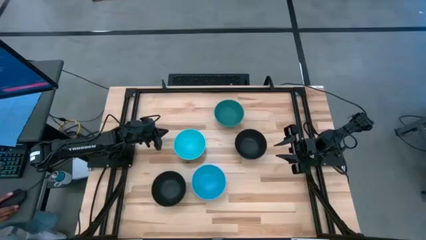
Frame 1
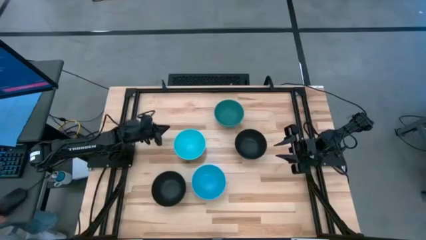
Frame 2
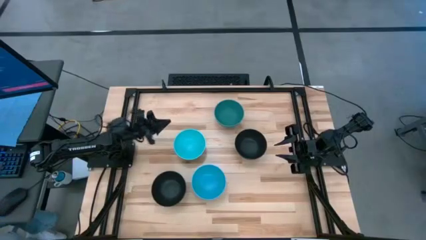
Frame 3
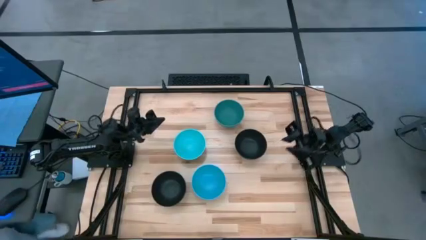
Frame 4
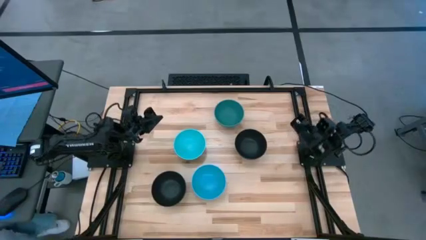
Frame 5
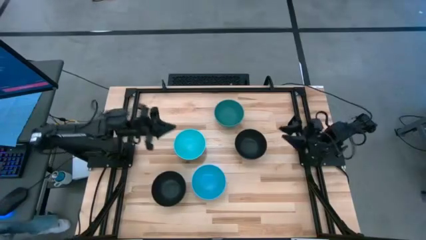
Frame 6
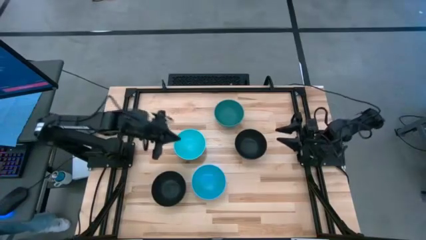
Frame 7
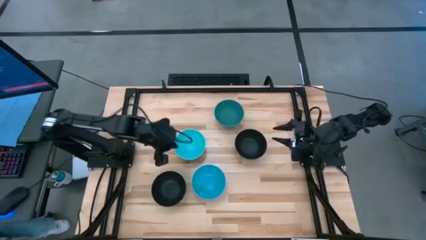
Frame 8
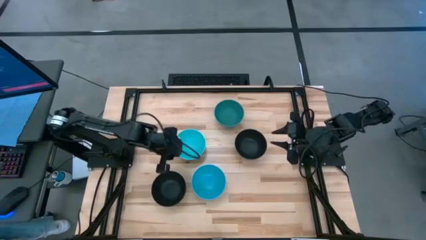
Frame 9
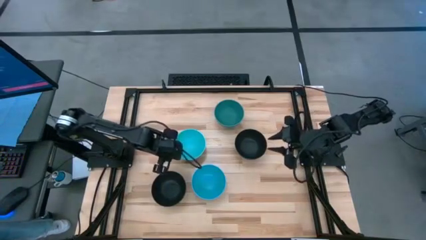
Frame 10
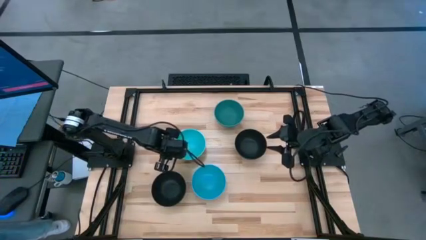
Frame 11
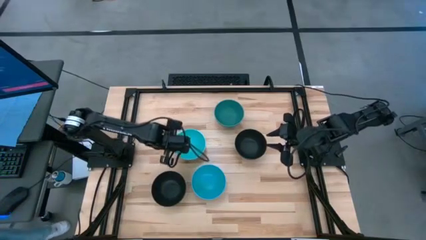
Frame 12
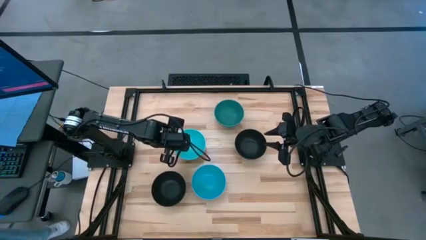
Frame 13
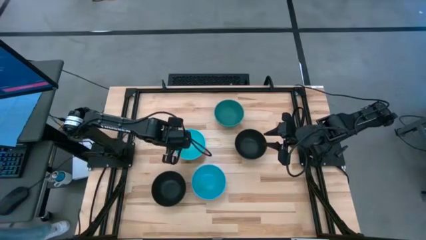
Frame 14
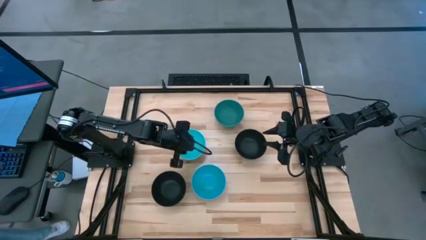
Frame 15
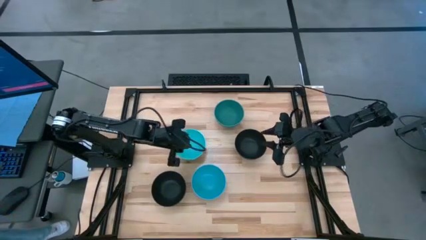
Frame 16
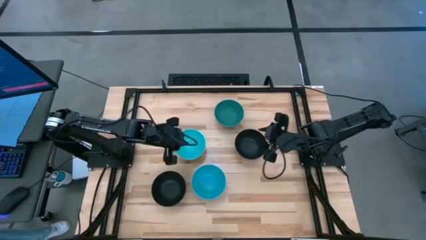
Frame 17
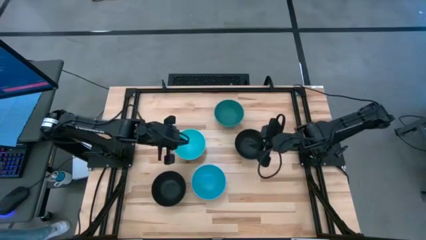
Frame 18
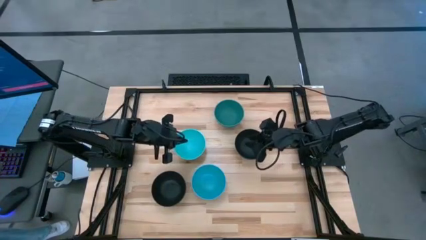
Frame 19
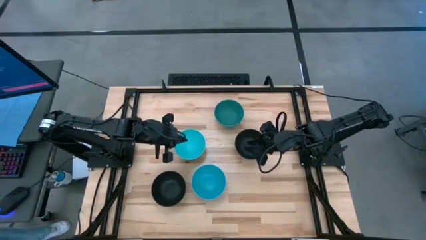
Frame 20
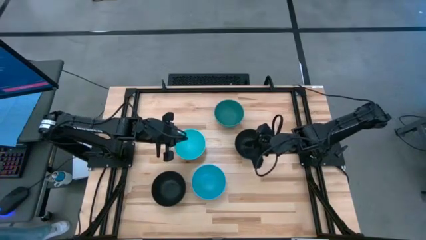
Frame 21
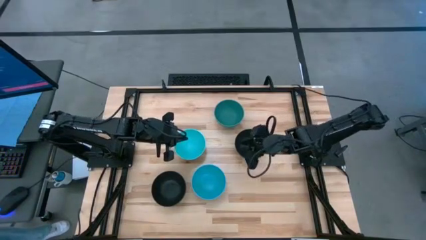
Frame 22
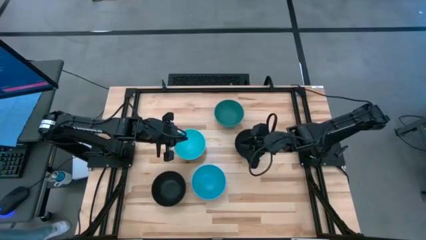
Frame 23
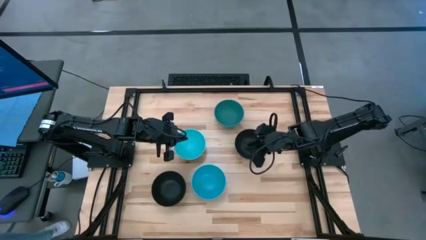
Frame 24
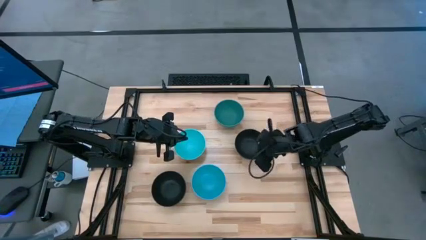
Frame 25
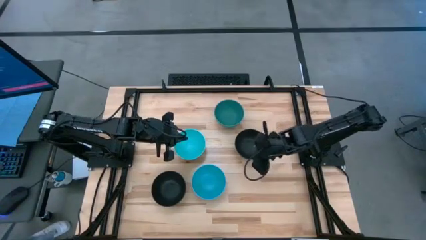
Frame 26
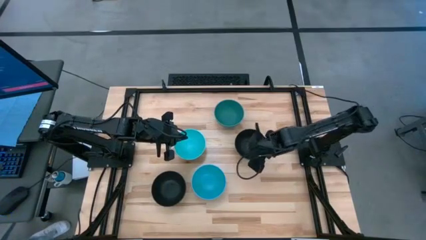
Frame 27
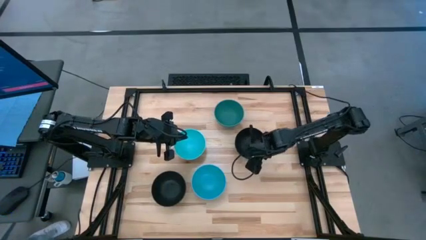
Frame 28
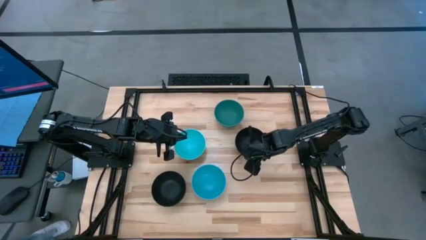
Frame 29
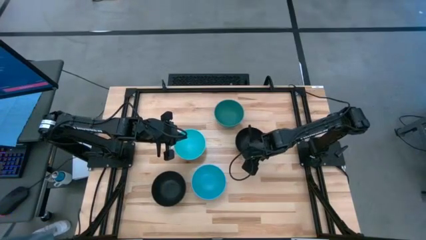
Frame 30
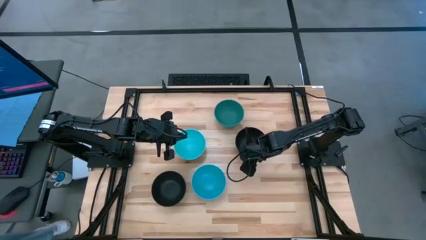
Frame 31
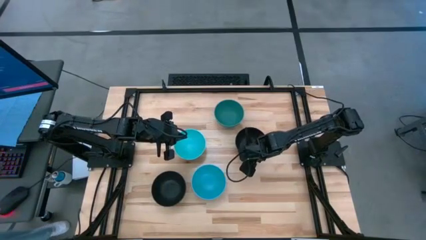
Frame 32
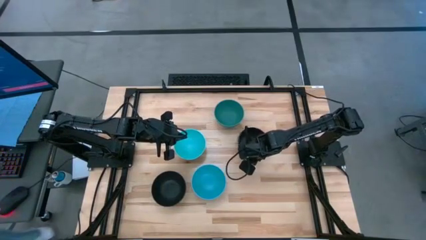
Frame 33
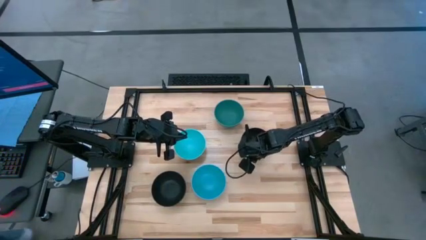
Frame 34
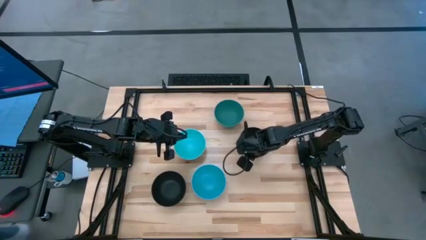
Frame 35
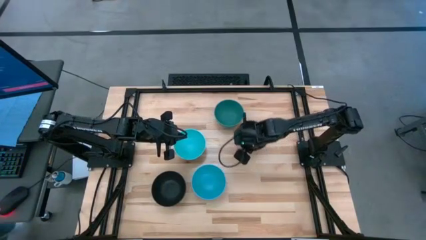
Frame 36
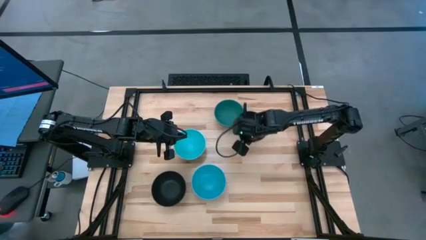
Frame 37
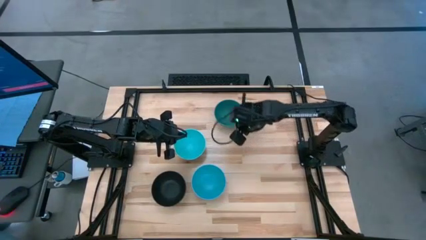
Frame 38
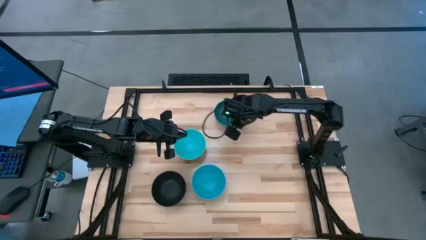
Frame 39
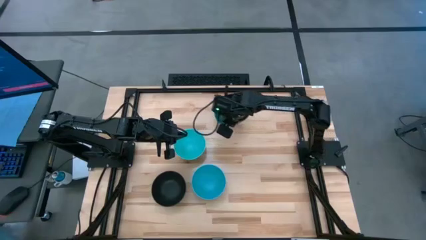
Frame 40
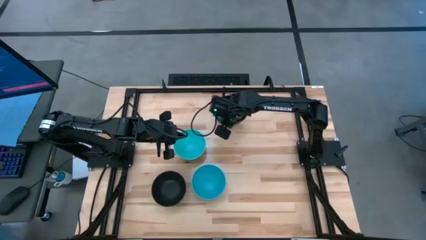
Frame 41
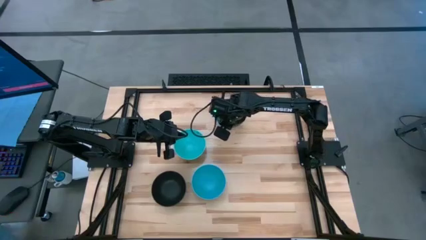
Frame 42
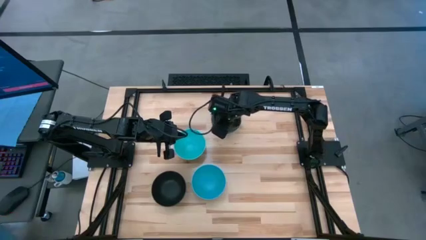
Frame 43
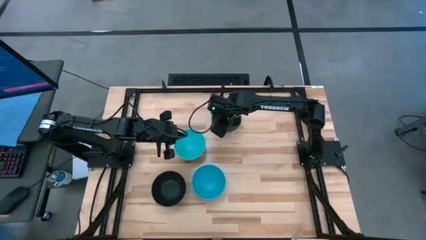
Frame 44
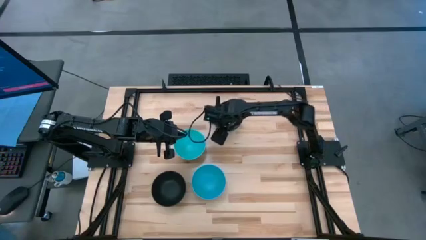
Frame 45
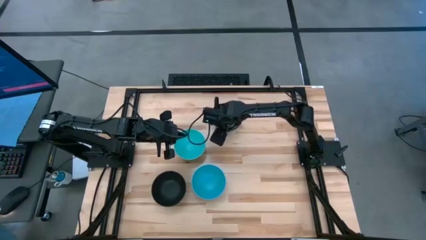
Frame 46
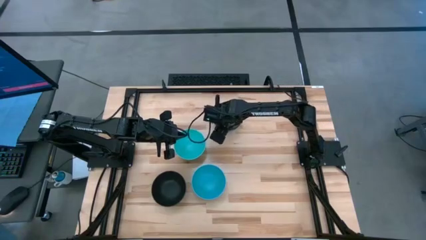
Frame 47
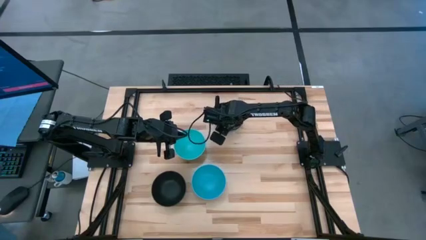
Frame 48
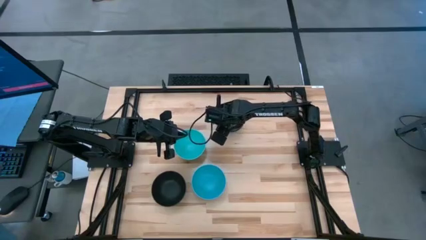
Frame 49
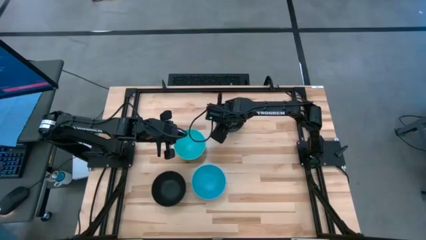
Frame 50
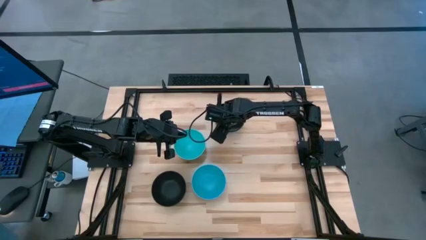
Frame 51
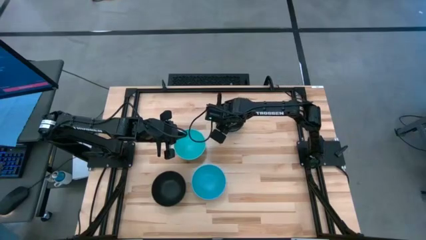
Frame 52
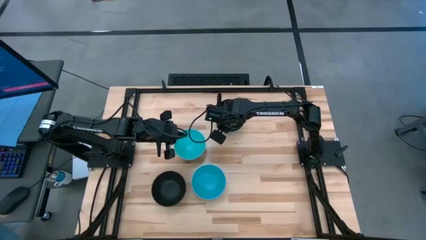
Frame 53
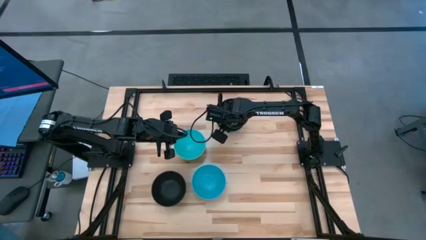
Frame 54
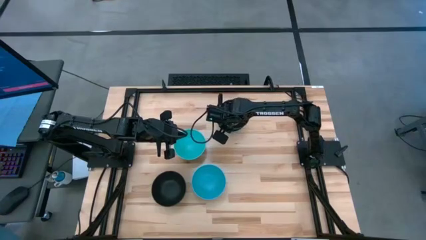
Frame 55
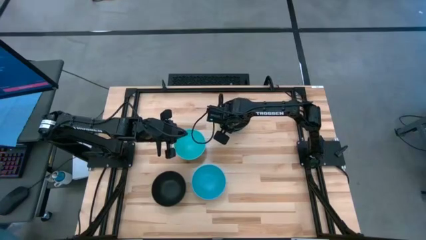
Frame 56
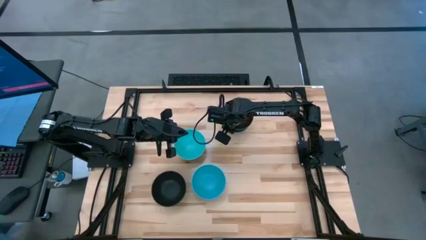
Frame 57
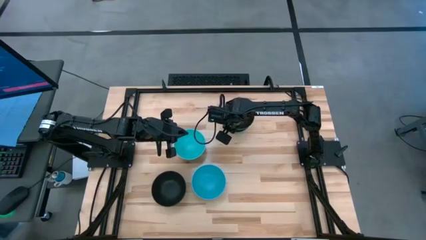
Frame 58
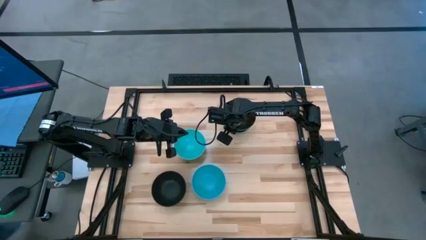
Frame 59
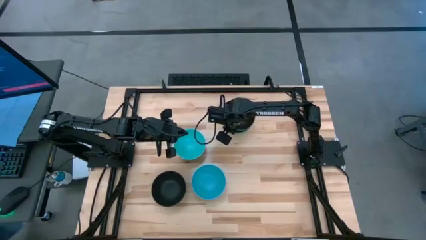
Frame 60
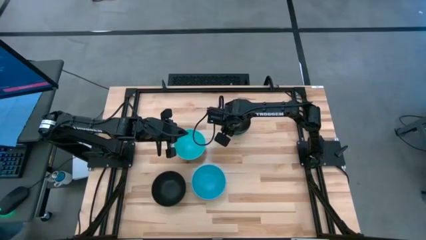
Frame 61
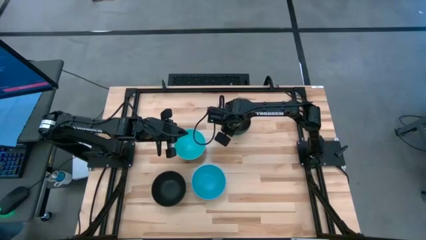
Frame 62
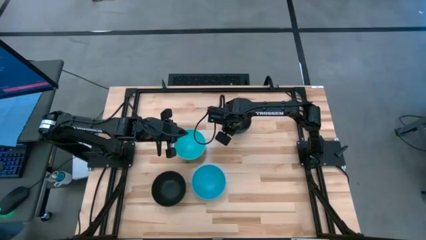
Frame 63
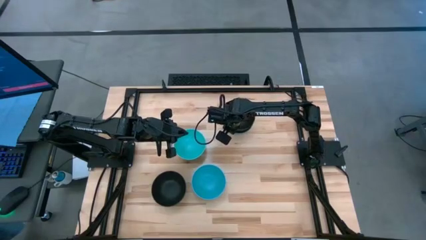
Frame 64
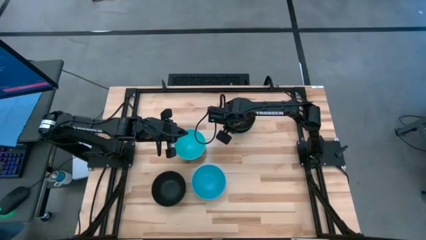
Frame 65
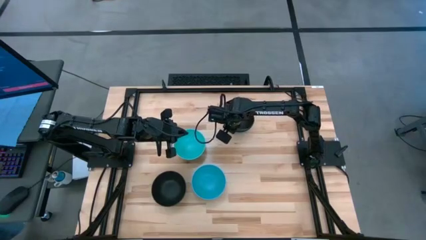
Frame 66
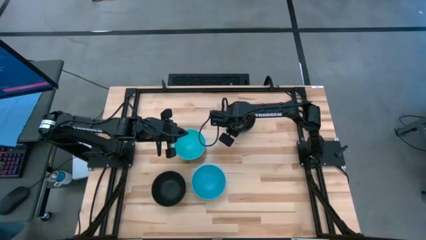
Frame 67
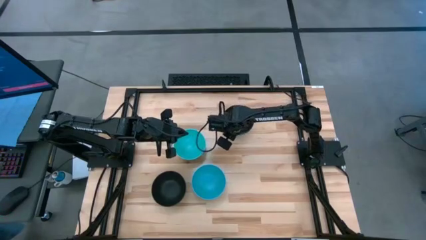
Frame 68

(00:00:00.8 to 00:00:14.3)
Task: Nest bowls inside each other
Stack the top black bowl on the green bowl

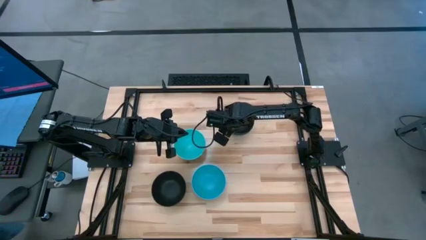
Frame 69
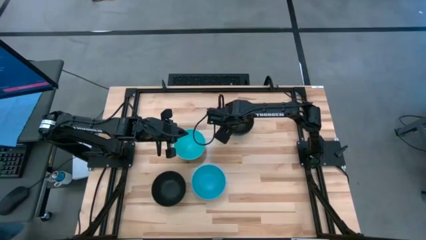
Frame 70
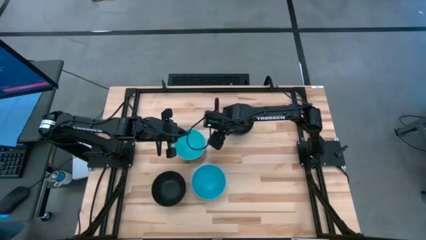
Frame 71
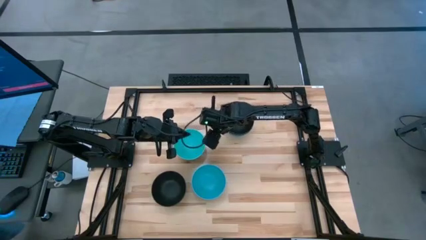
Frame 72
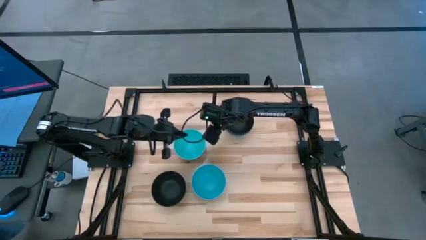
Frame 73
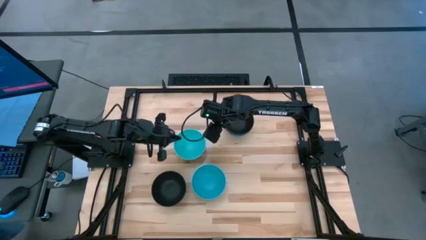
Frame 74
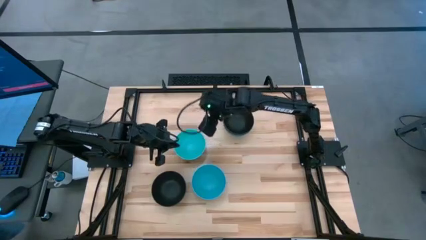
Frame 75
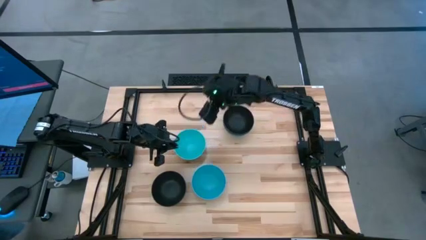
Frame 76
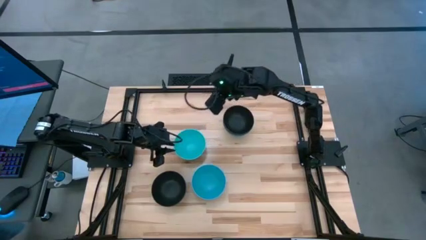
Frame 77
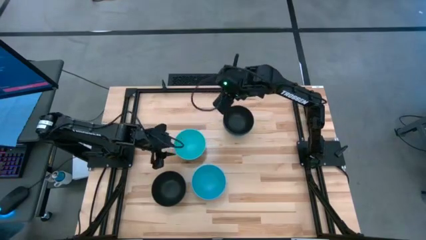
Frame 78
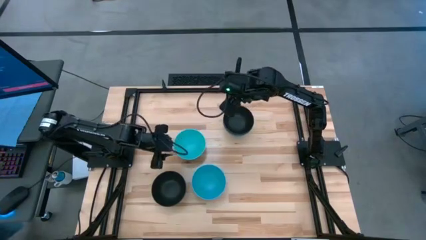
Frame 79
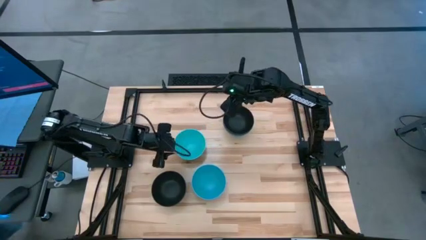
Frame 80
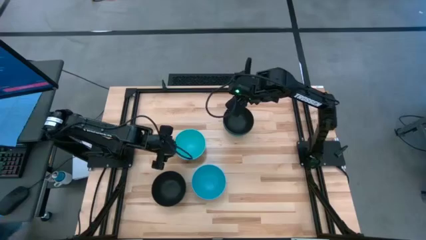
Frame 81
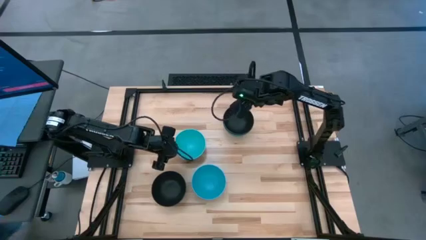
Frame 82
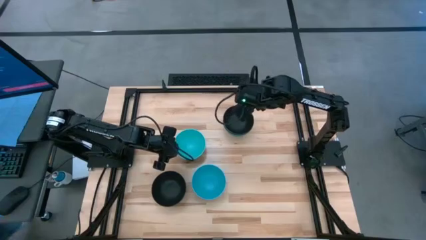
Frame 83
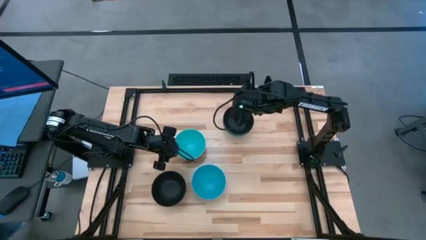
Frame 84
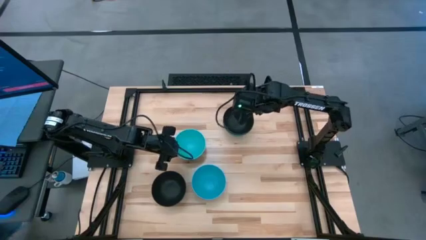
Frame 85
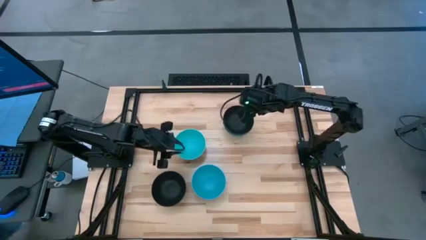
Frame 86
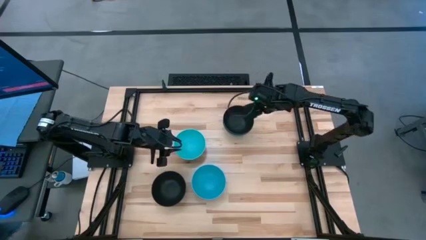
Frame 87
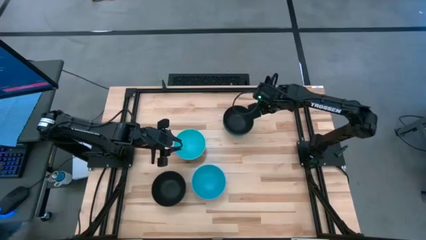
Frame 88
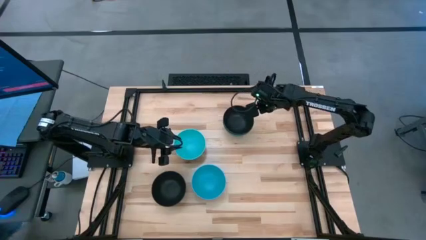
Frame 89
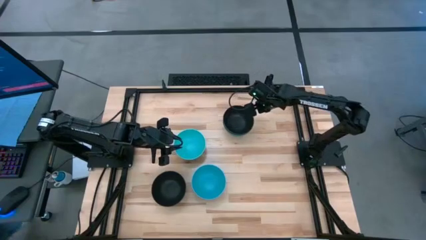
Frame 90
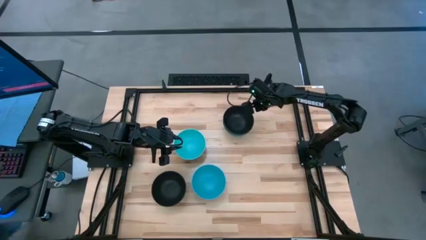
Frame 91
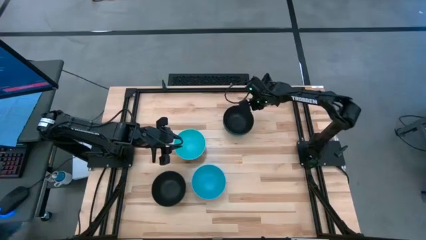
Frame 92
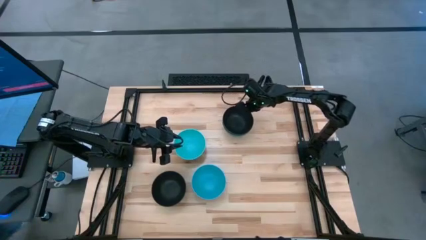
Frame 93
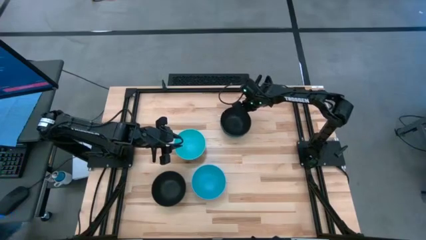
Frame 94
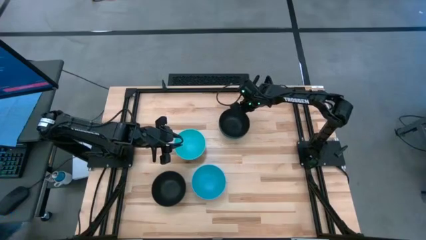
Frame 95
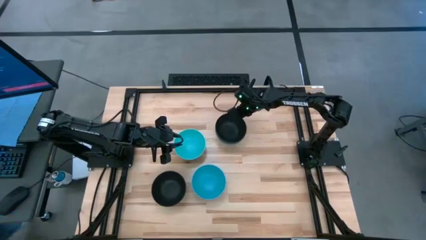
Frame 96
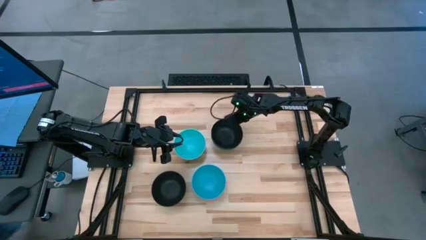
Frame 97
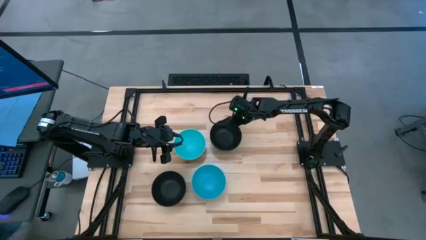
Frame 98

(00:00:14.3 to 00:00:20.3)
Move the stacked bowls to the center of the table
